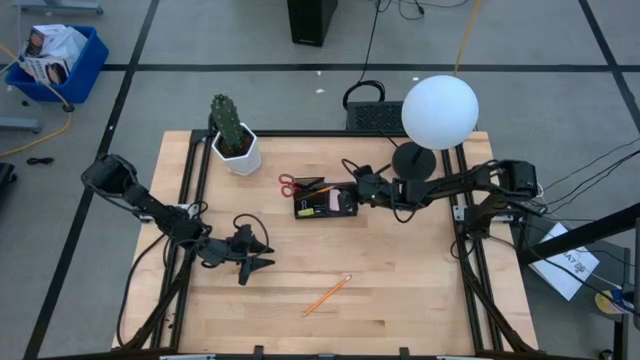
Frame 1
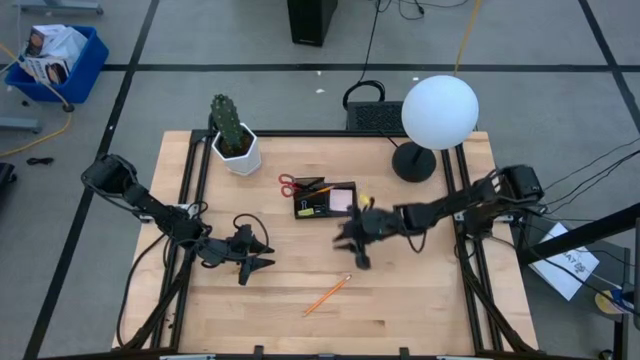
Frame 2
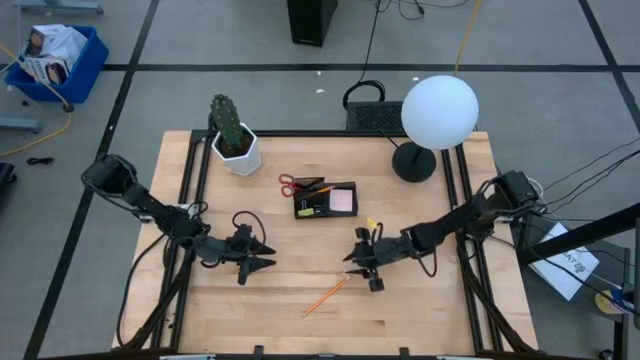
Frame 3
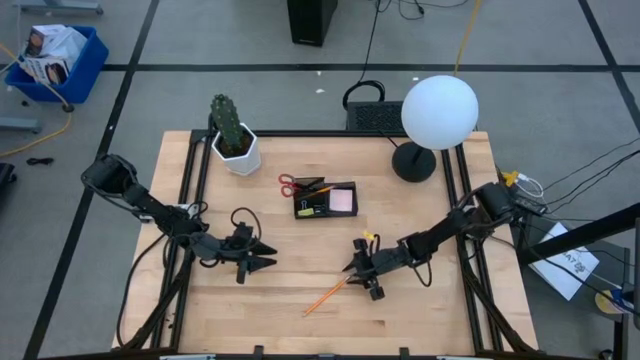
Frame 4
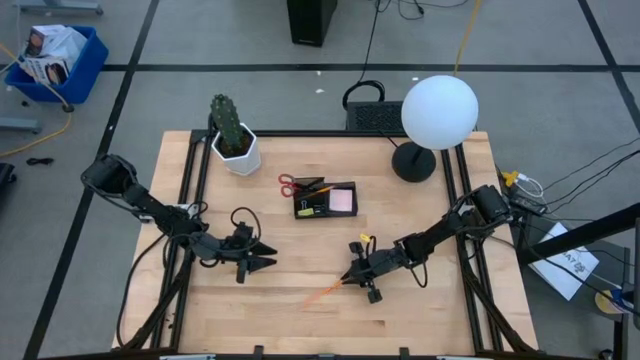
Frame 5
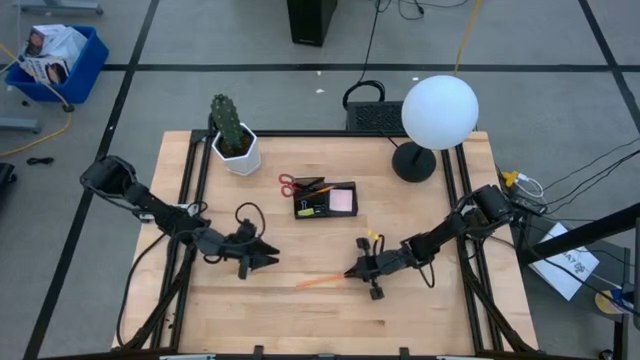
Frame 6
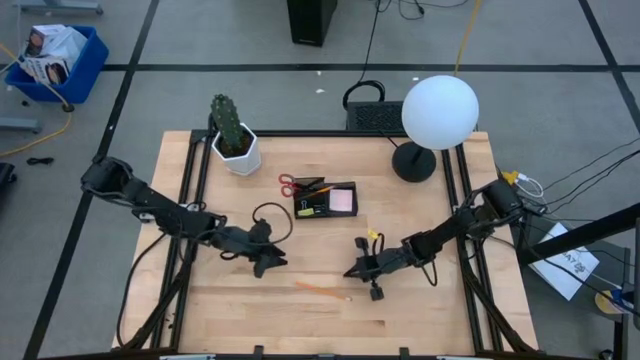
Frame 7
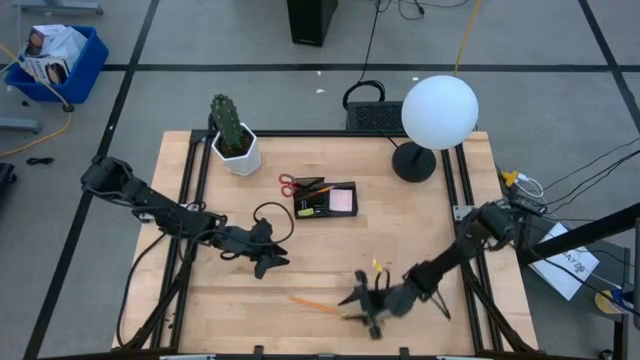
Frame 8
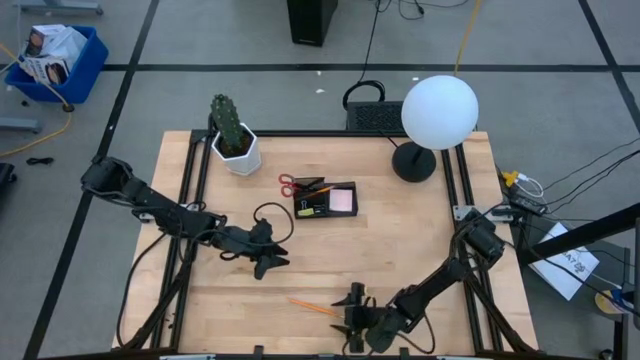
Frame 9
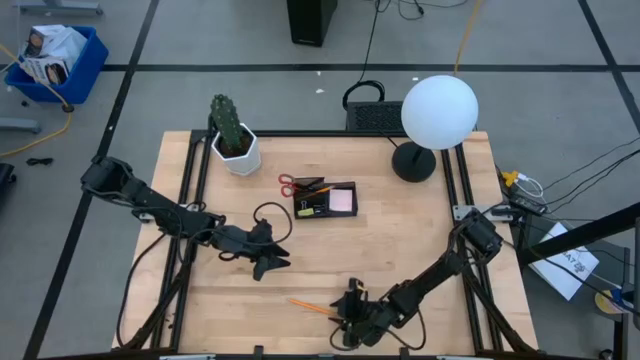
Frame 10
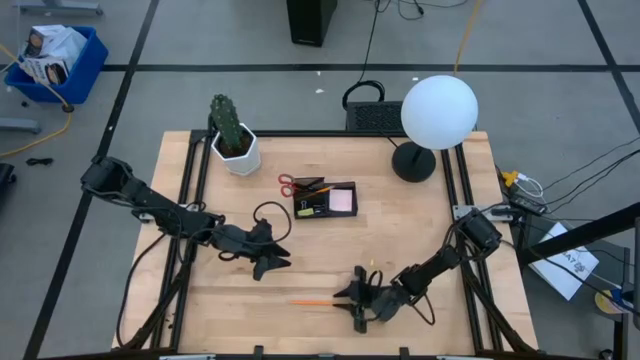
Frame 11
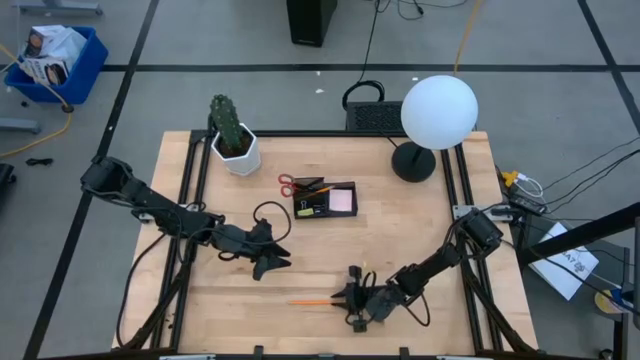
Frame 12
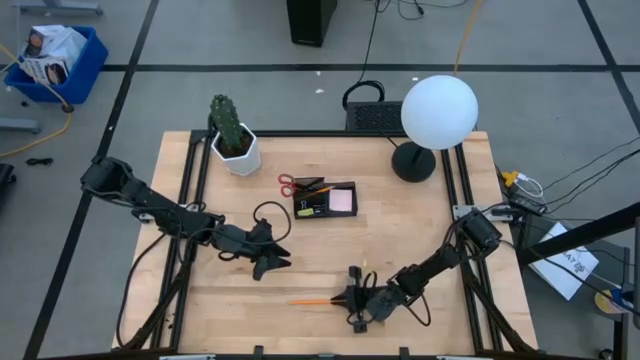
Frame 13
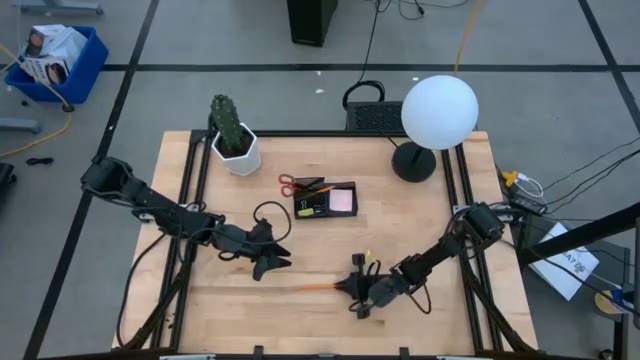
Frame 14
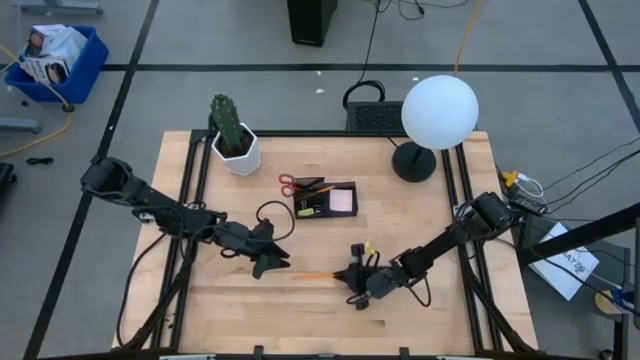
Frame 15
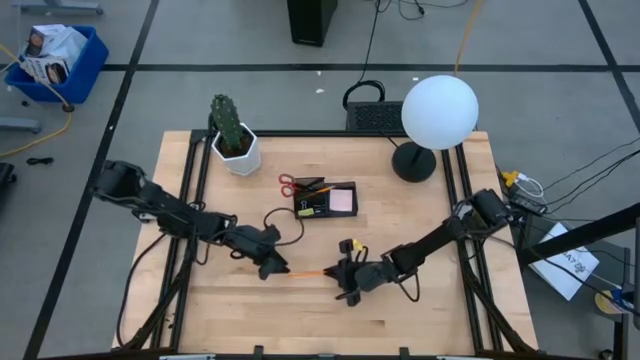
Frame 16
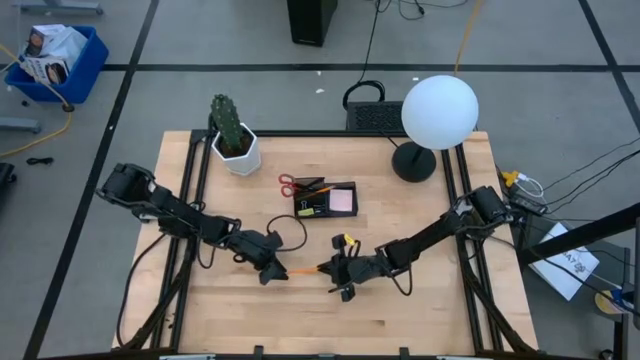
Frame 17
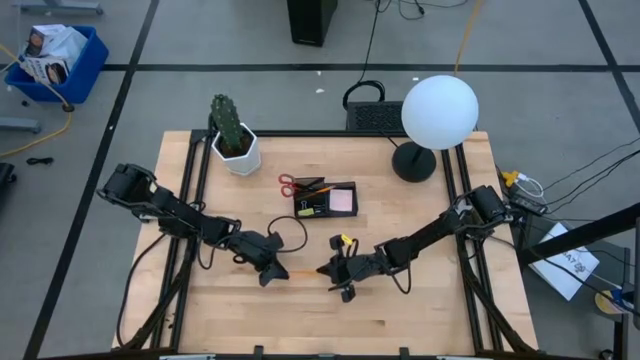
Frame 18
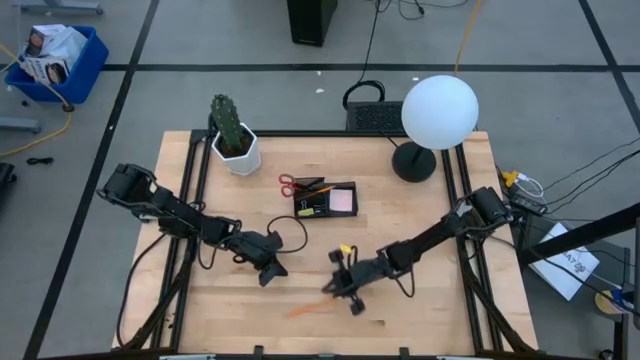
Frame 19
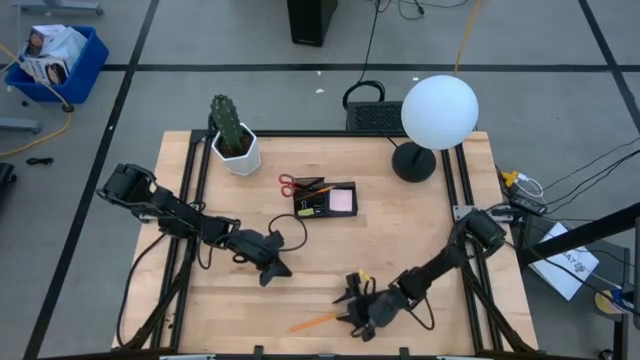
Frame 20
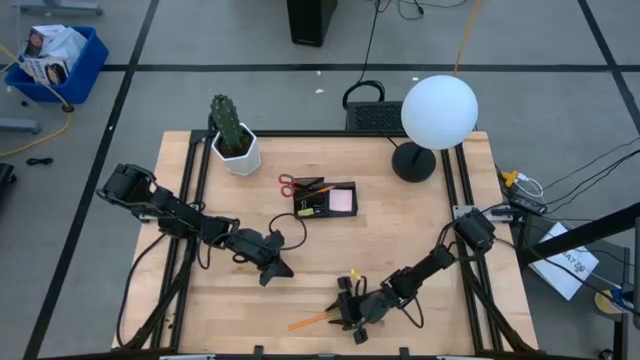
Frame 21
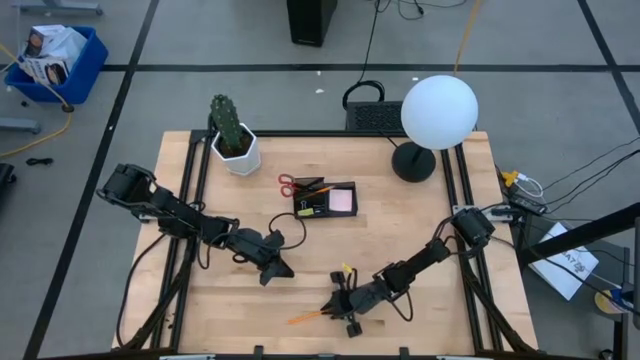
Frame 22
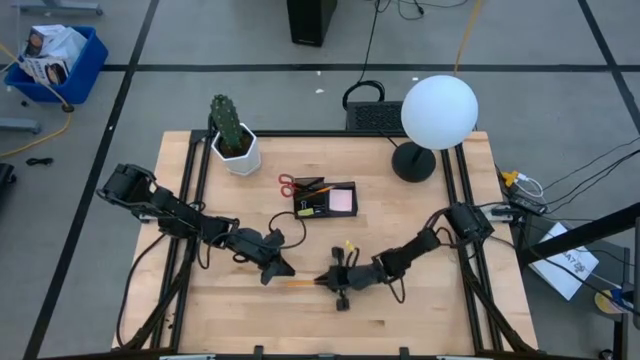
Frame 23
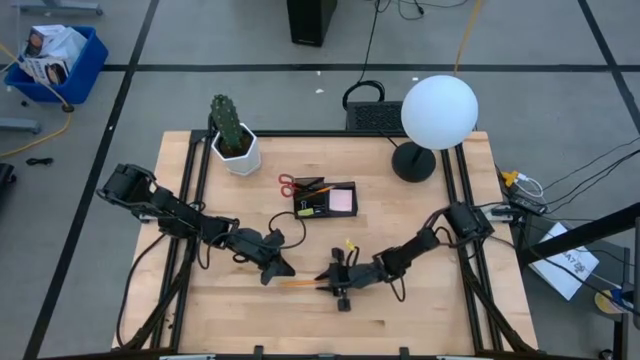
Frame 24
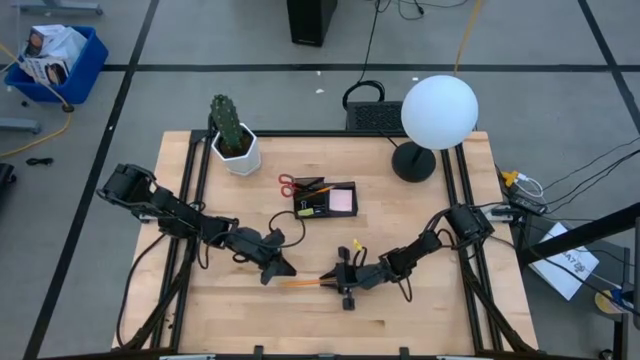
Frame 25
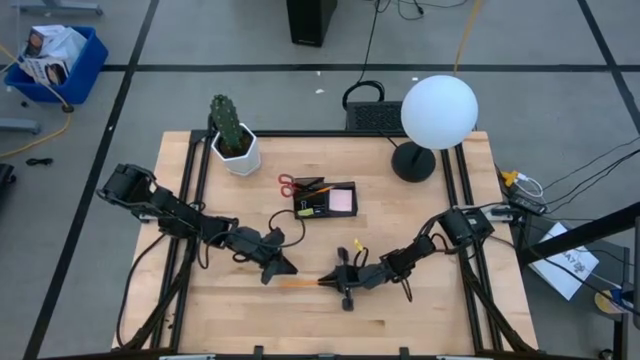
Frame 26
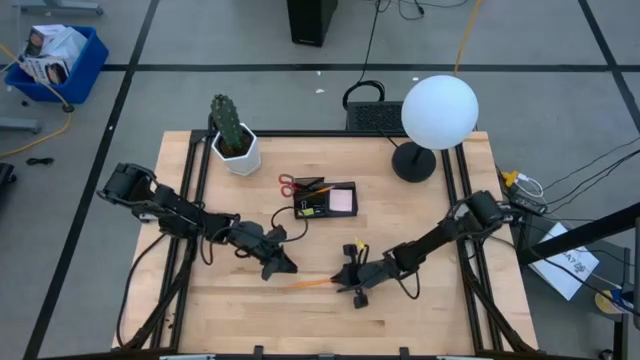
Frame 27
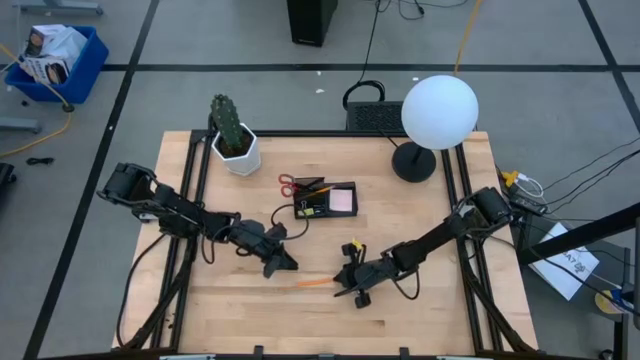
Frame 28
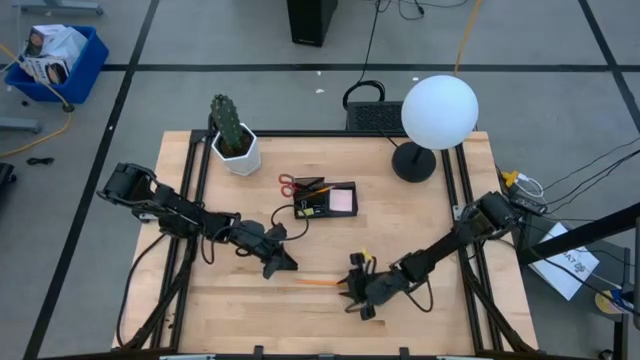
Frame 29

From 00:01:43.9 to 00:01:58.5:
Task: Pick and place office supplies into organizer
Put the orange pencil into the top left of the desk organizer

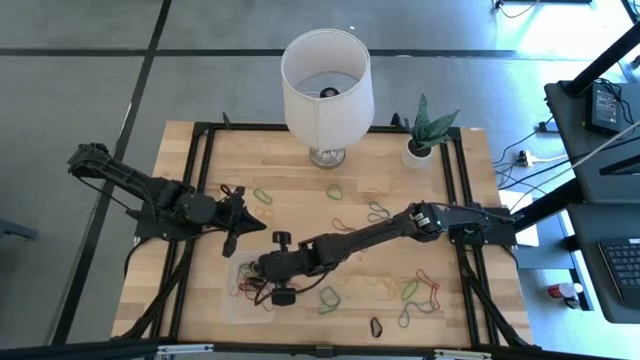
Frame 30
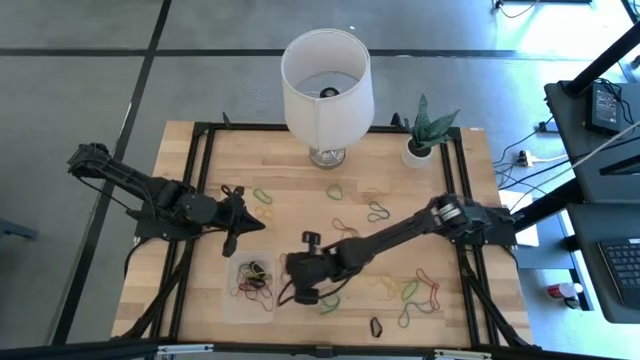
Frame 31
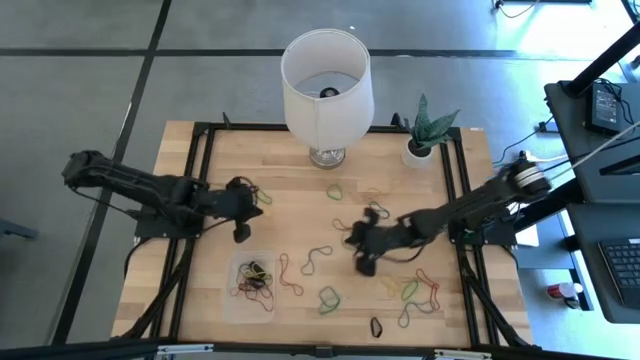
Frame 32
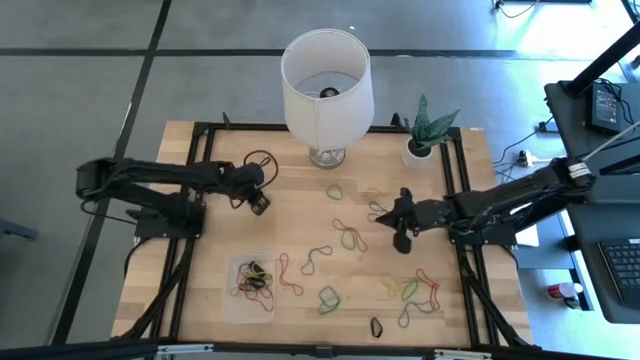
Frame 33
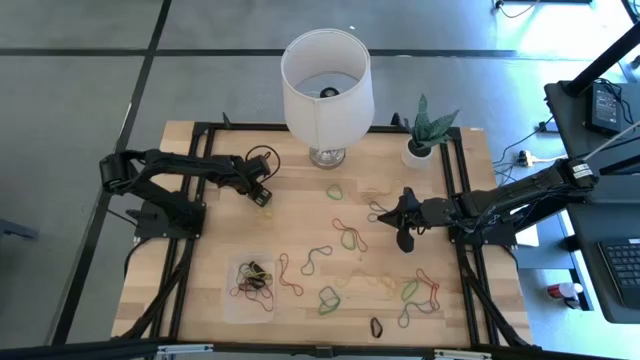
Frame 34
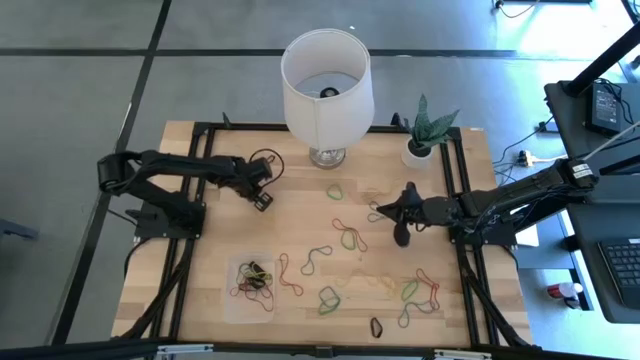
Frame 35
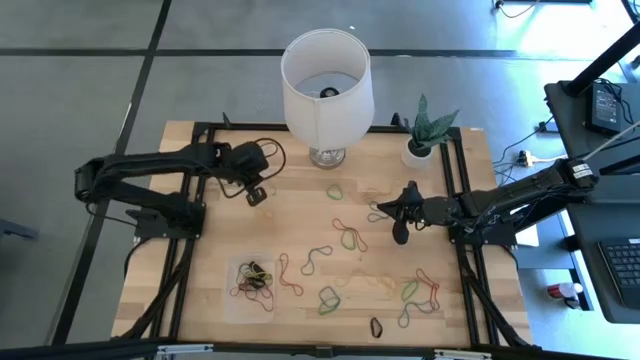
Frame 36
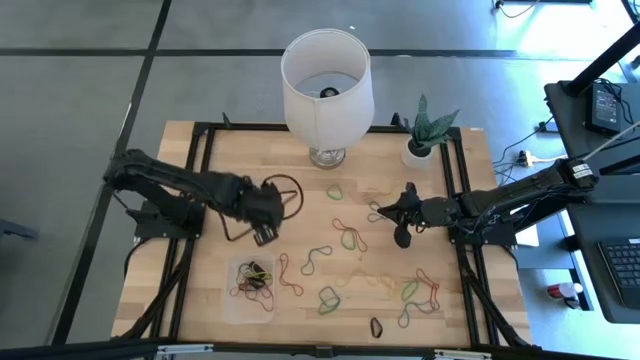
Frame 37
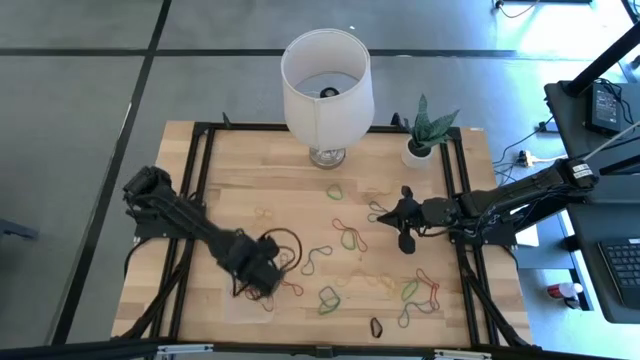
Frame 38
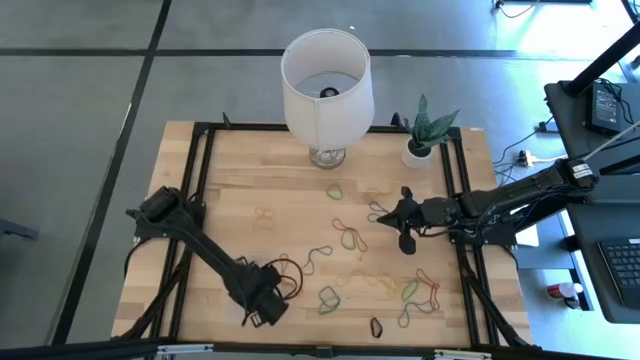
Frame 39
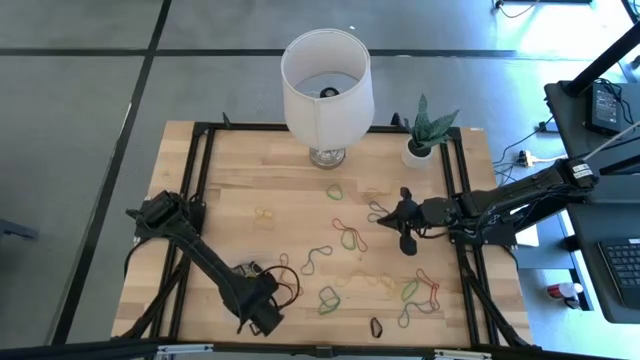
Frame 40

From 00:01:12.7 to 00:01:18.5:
Task: Pick and place rubber bands into bin
Put the green rubber band into the transparent bin

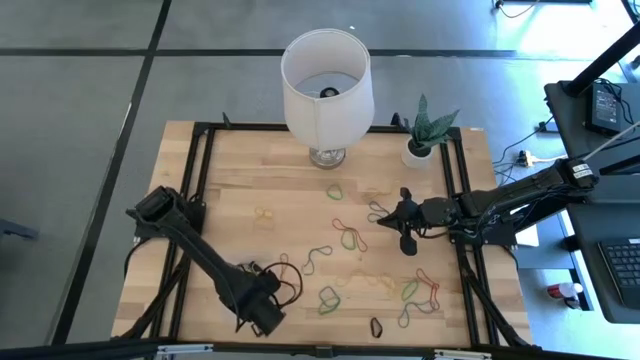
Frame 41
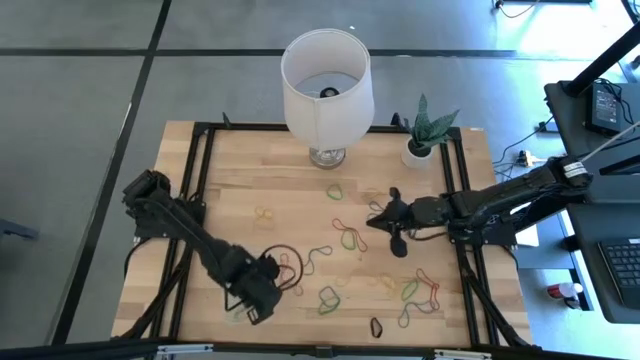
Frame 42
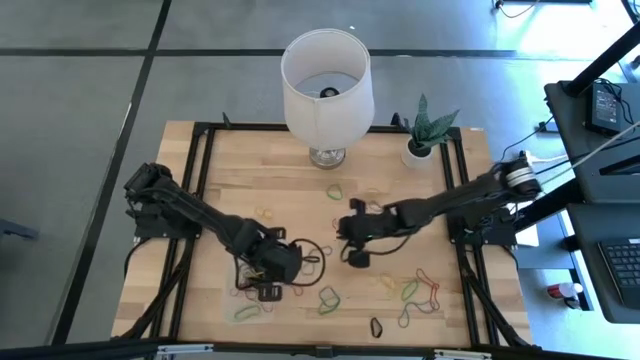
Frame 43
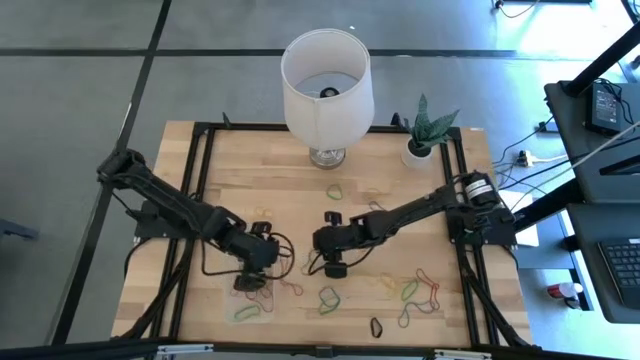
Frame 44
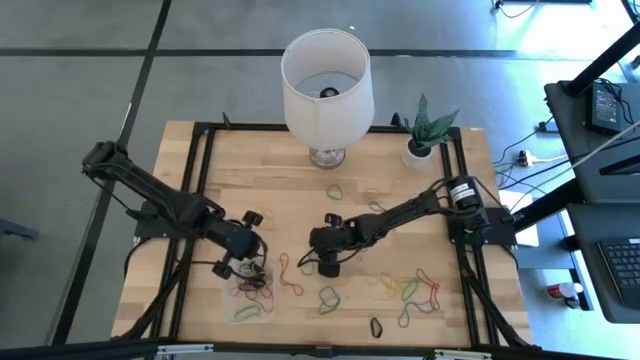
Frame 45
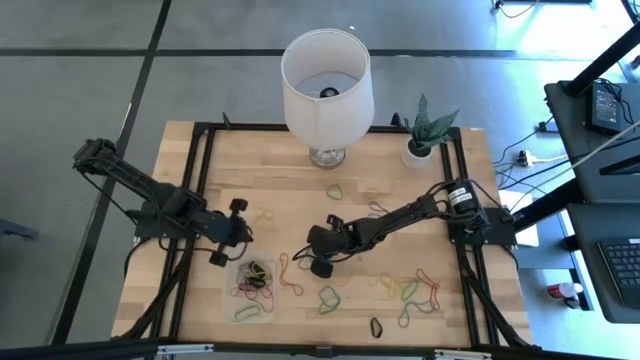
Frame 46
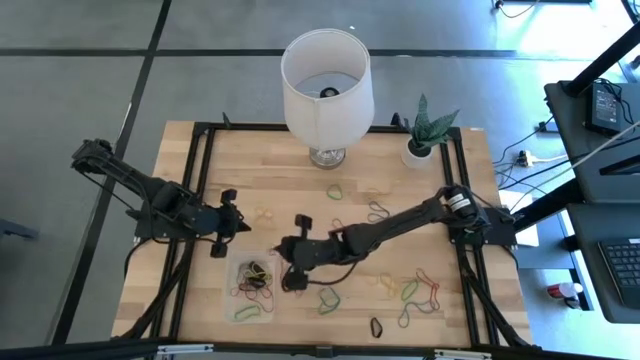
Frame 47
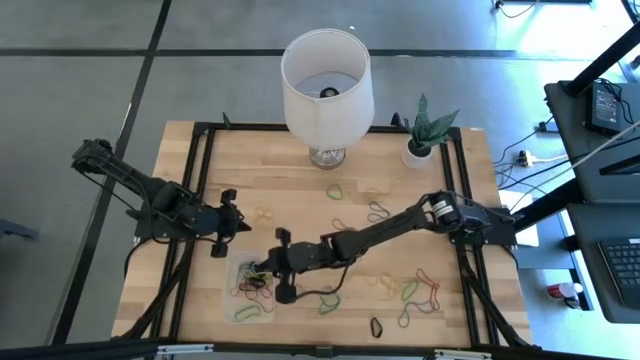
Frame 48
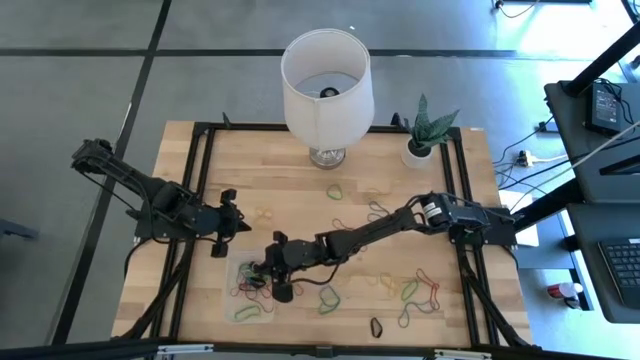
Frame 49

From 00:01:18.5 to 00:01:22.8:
Put the large blue rubber band into the transparent bin
